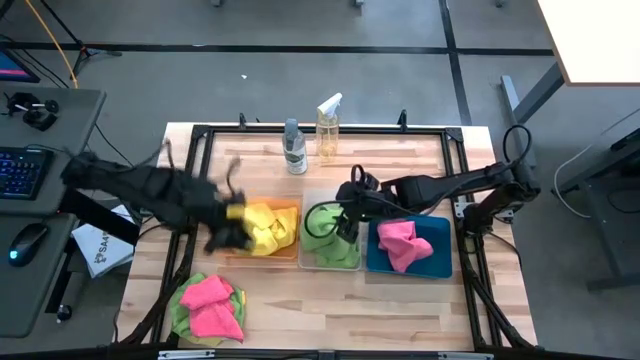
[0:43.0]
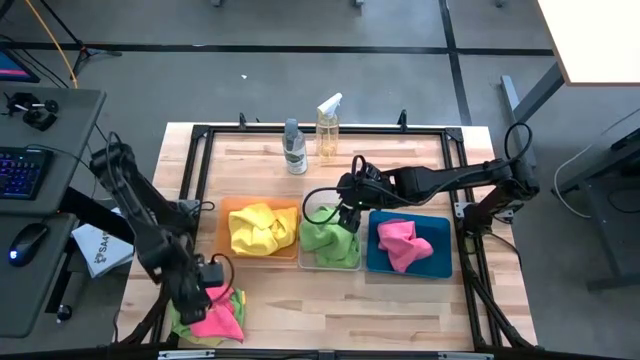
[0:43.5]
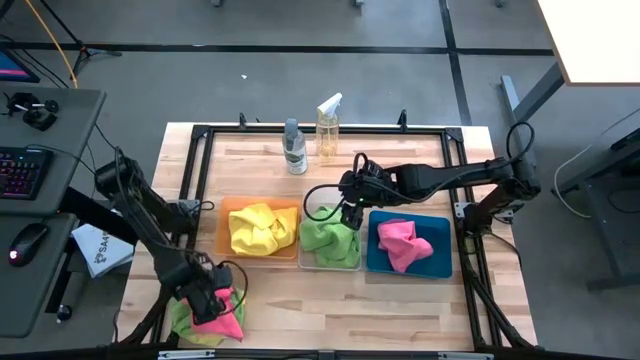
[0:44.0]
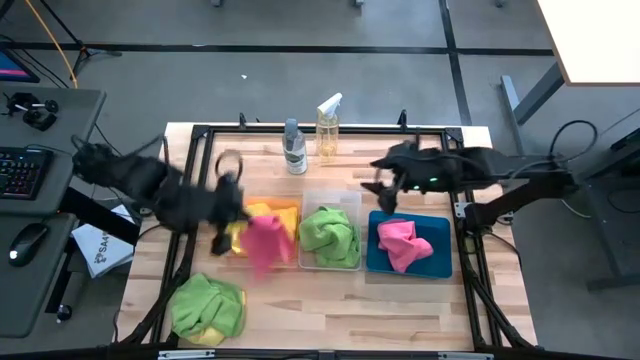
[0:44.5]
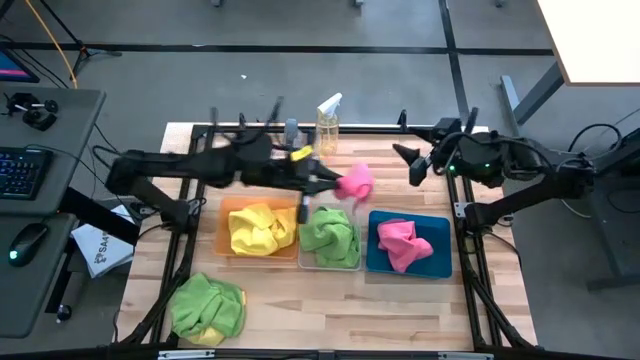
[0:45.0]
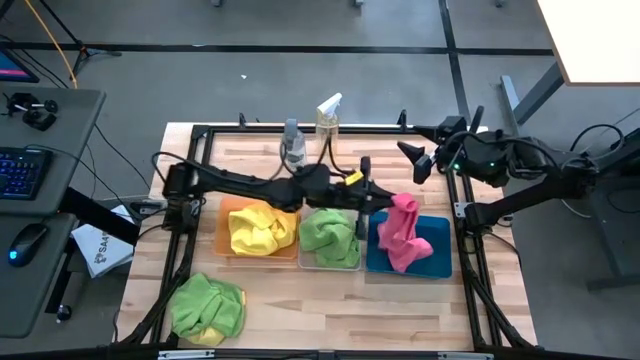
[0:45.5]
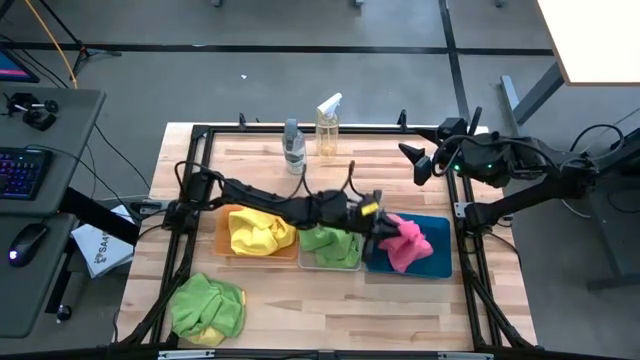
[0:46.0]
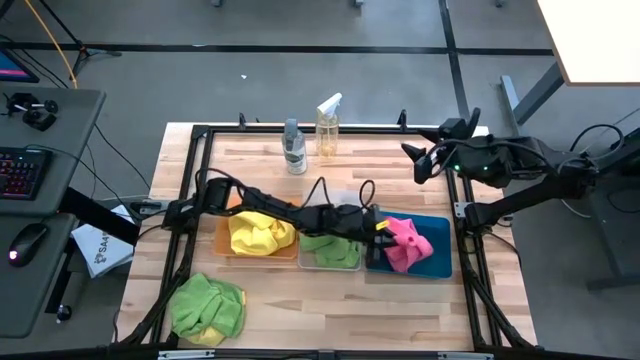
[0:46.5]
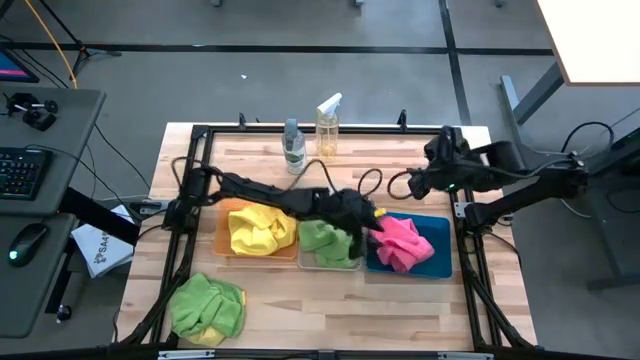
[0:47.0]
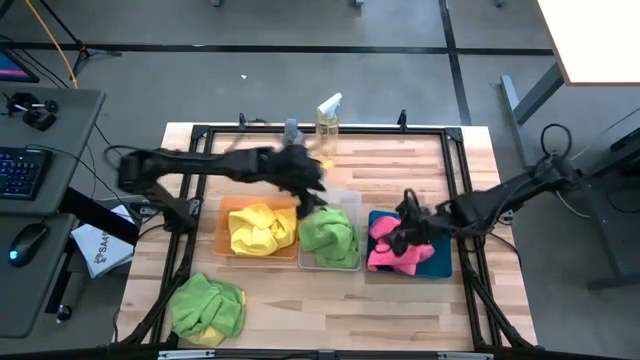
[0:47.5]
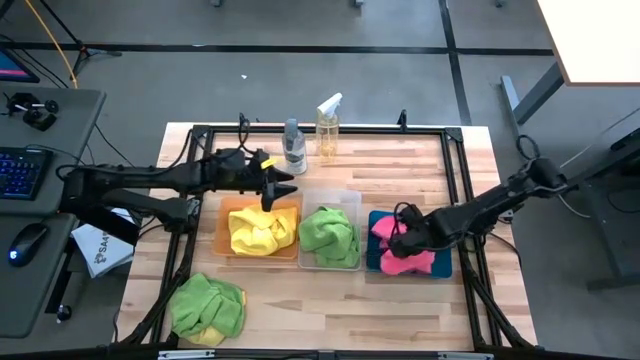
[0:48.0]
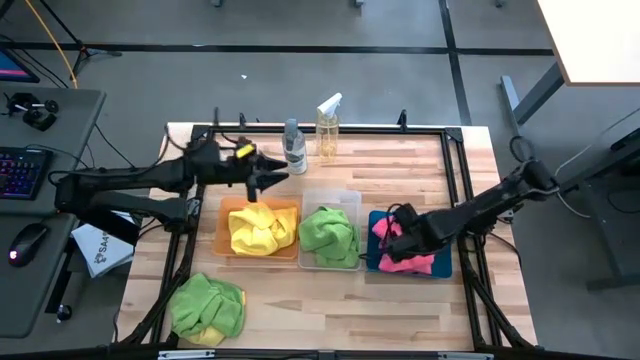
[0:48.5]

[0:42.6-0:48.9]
Task: Sort microfiber towel by color & place in baskets
Put the pink microfiber cloth into the blue bin

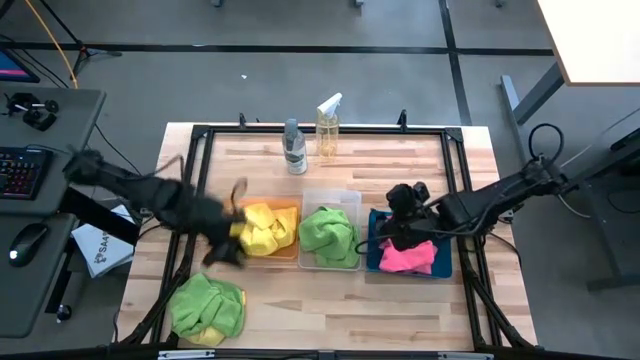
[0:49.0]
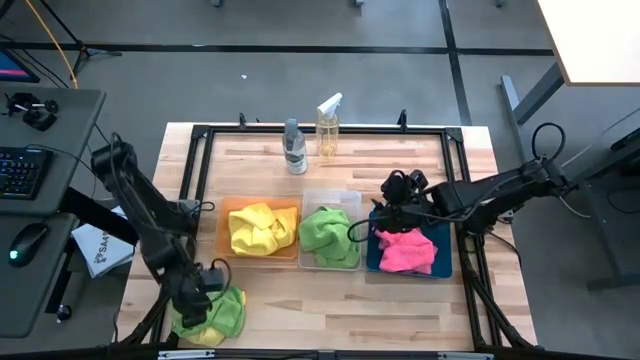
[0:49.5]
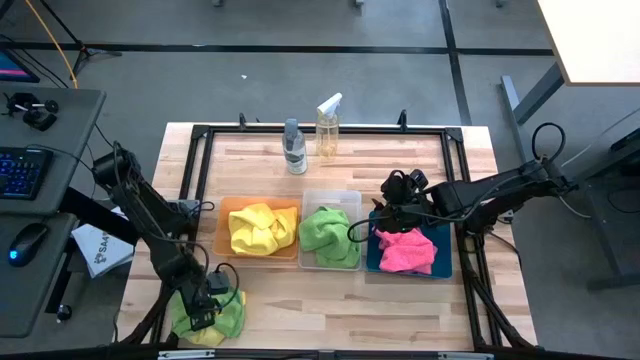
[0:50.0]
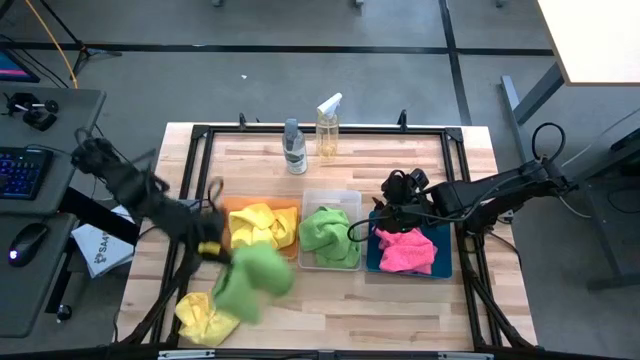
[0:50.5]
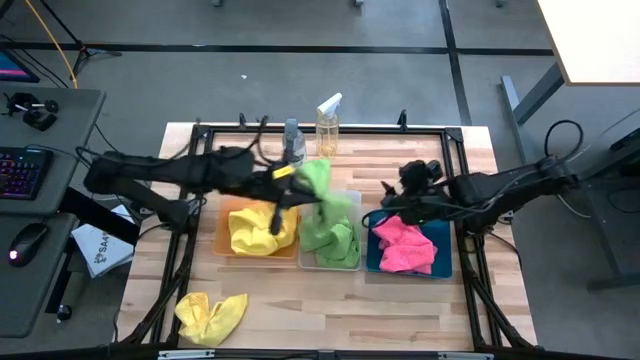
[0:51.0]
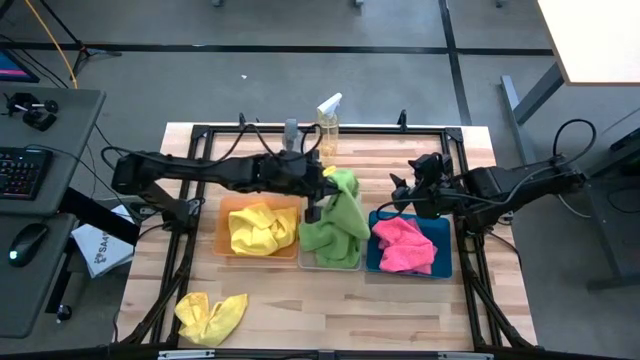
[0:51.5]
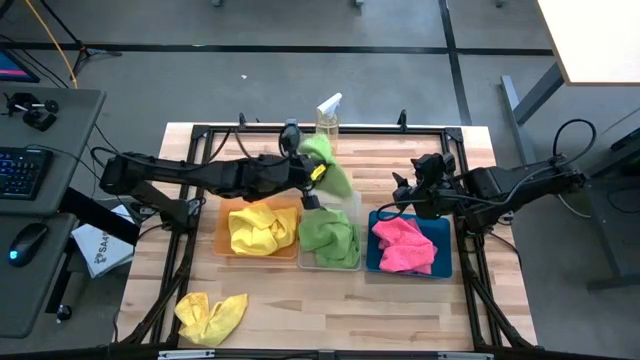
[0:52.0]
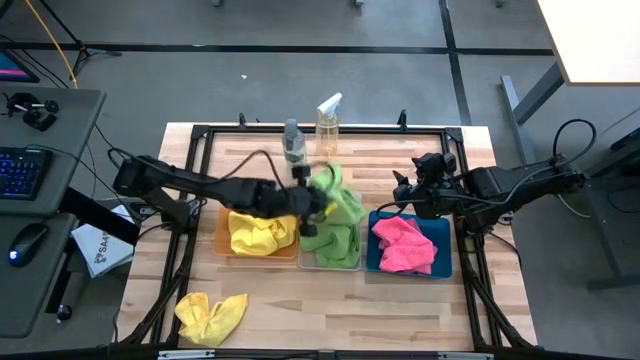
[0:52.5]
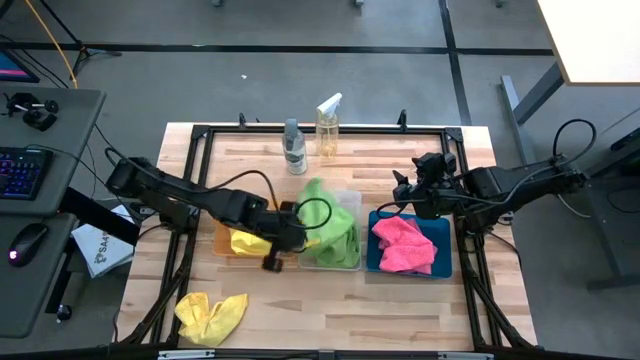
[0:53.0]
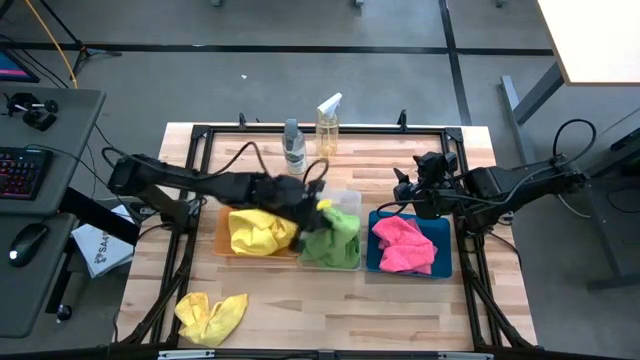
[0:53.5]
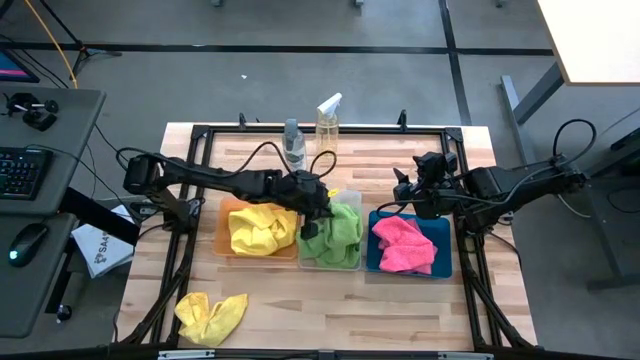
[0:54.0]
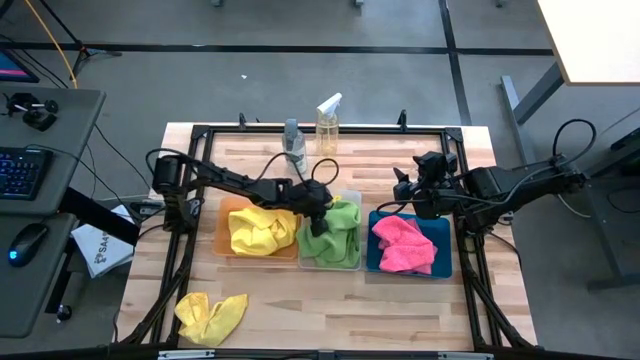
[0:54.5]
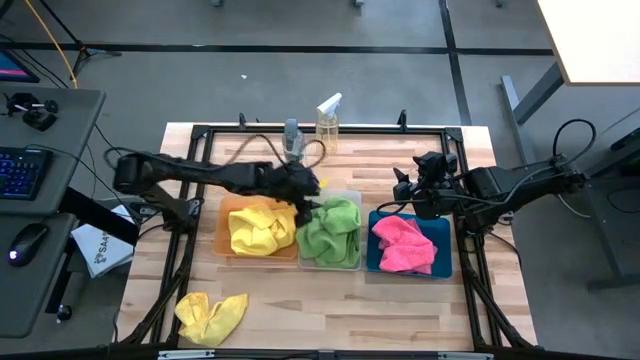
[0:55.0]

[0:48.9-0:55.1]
Put the green microfiber cloth into the transparent bin

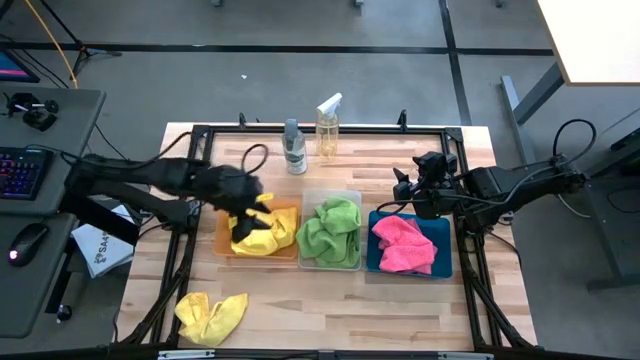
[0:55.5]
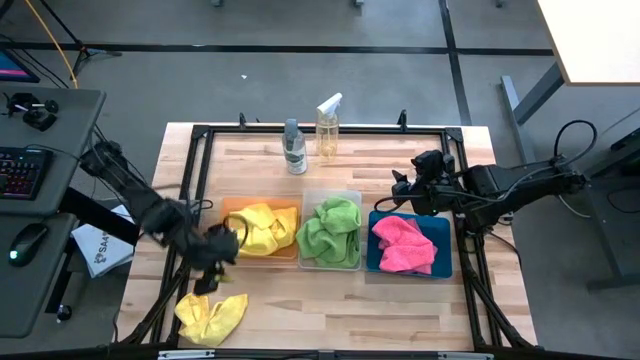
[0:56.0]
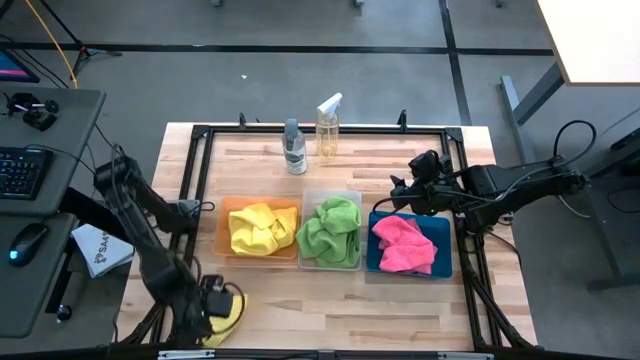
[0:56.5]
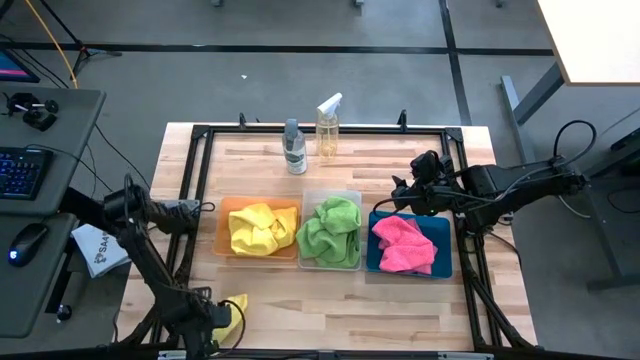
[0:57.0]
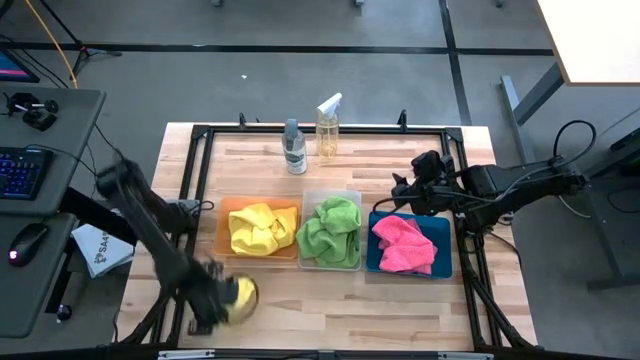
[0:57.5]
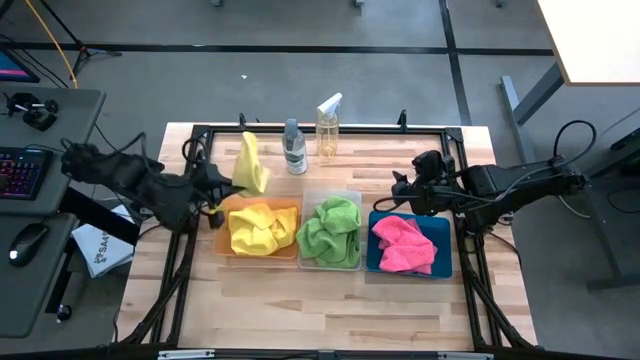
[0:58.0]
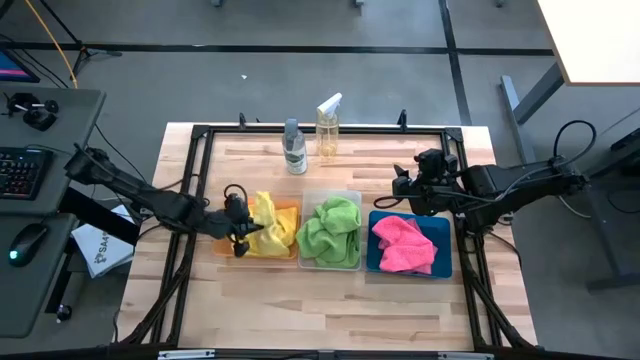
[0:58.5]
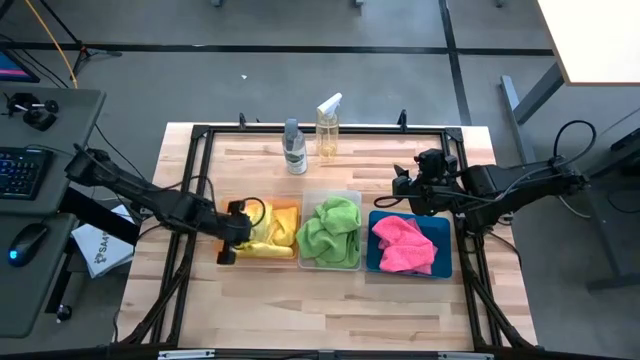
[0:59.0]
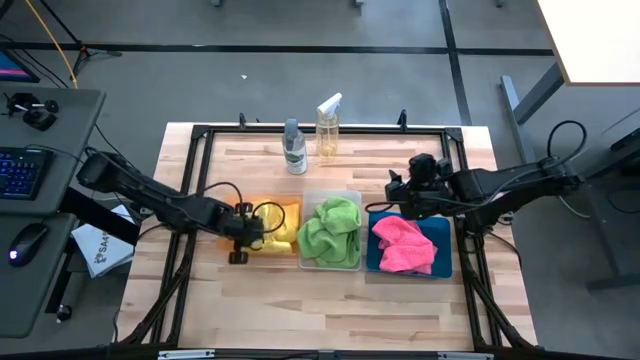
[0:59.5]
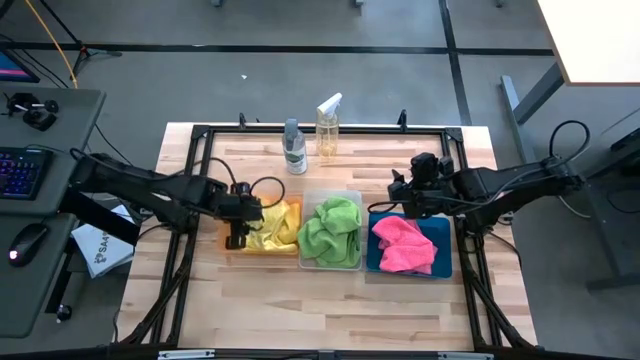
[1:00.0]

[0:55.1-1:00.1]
Put the yellow microfiber cloth into the orange bin

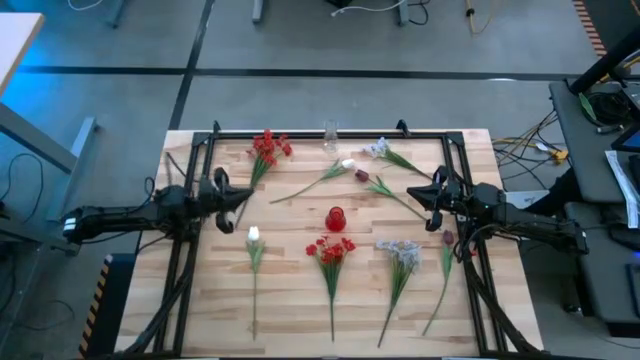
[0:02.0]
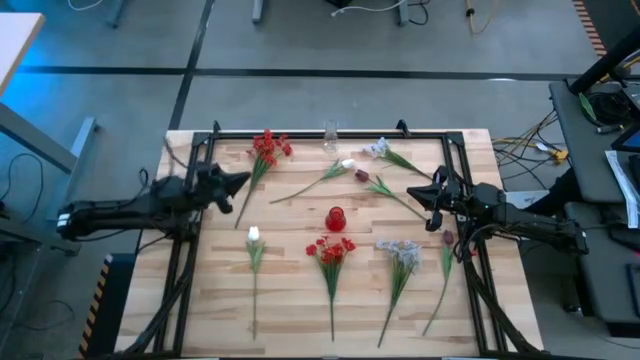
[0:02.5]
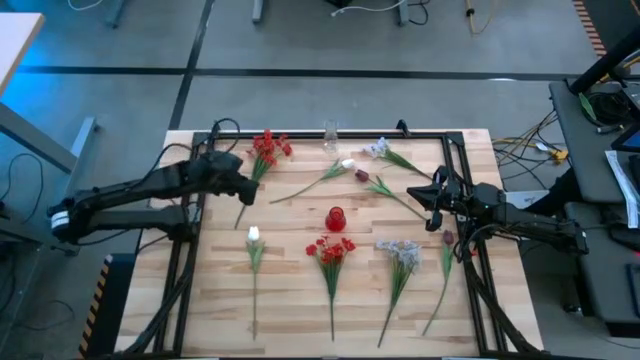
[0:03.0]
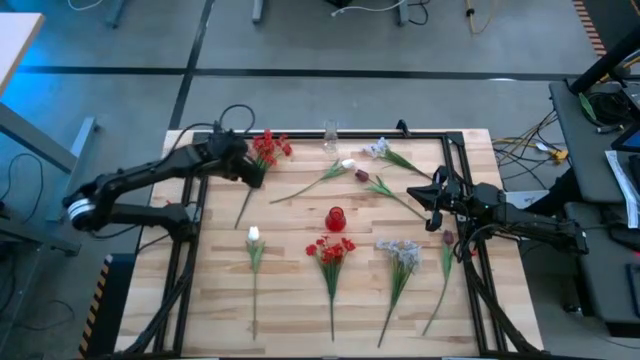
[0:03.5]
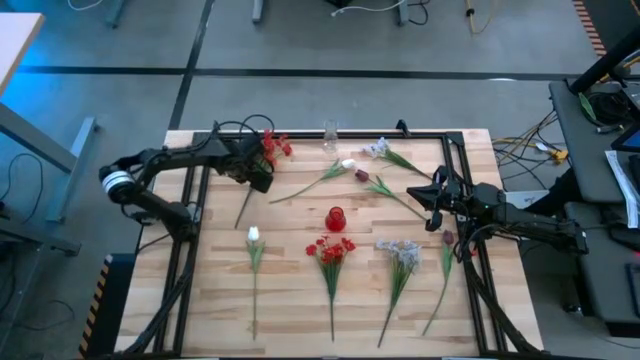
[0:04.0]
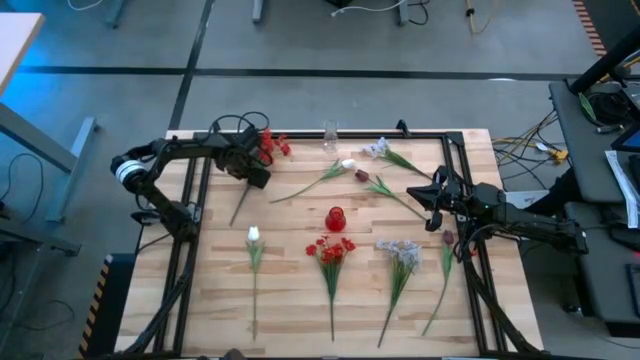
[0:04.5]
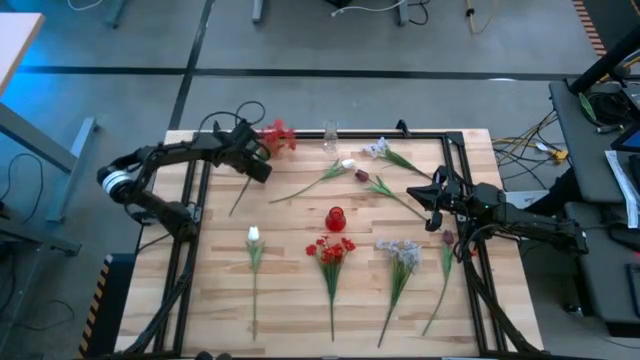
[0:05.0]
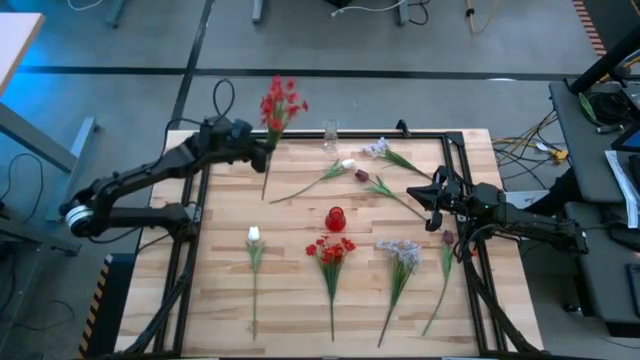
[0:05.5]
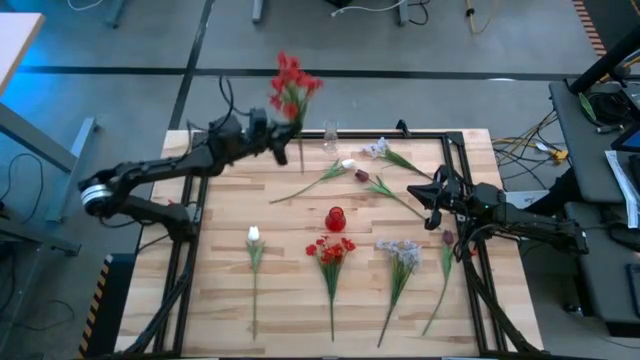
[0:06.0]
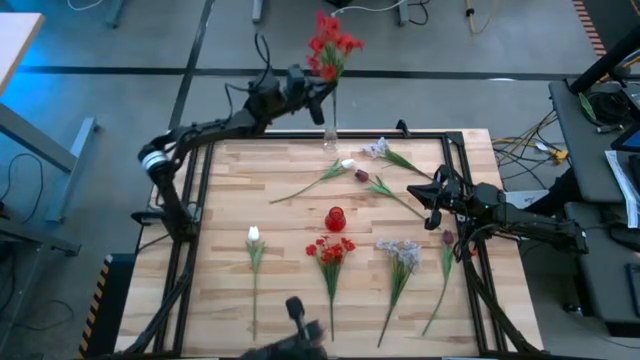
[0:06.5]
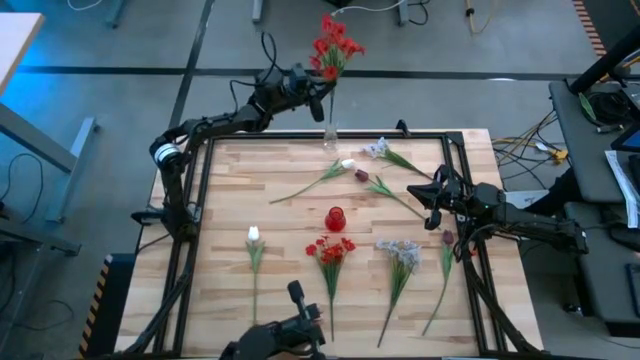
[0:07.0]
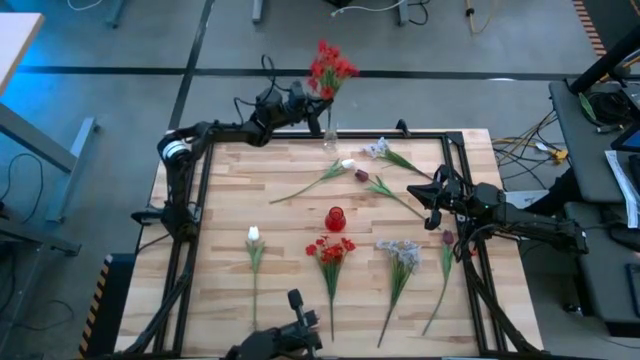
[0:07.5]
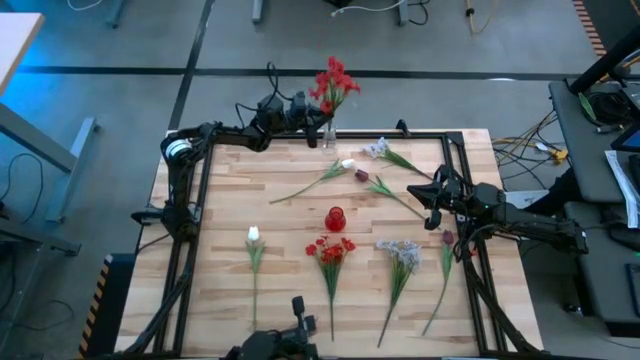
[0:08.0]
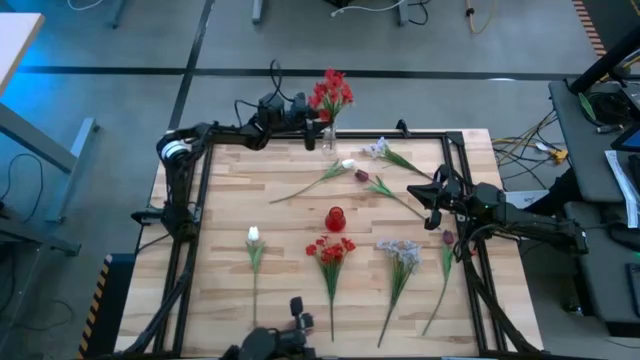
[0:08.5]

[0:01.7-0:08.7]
Task: Sort flowers into vase by color
Put the top red flowers into the transparent vase
